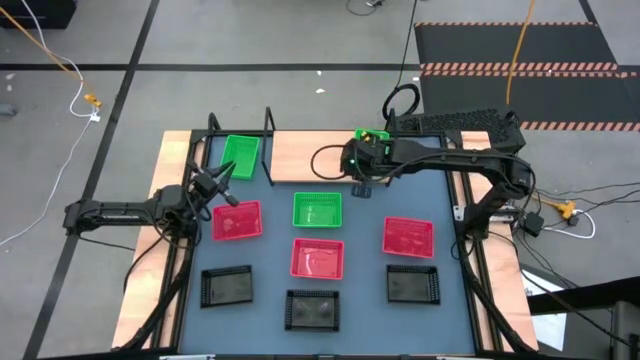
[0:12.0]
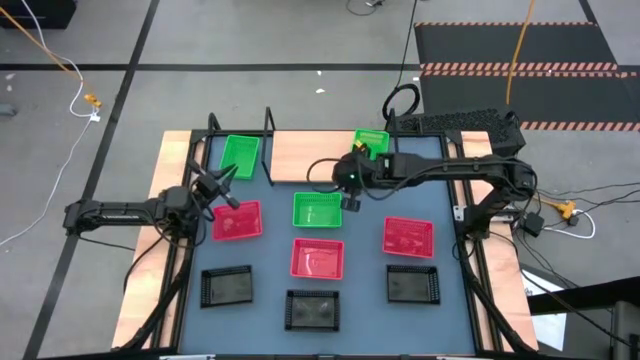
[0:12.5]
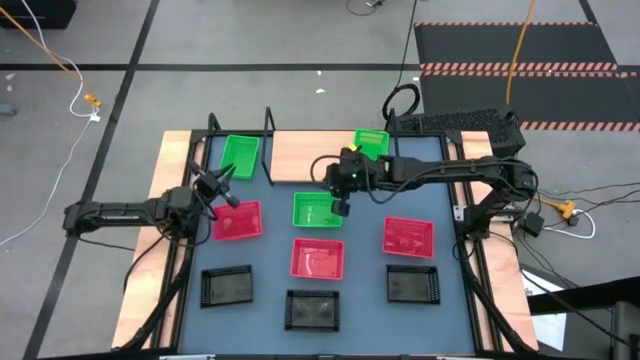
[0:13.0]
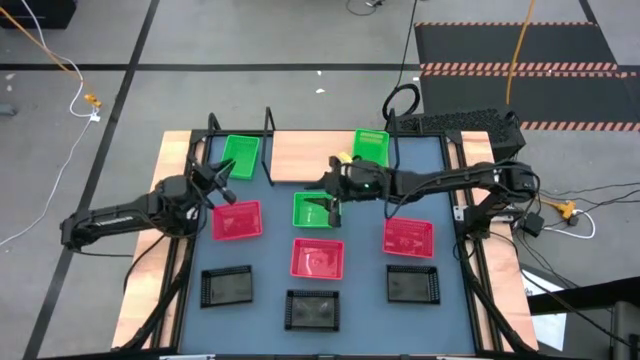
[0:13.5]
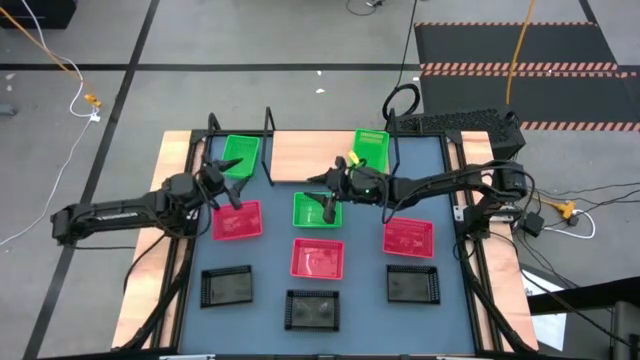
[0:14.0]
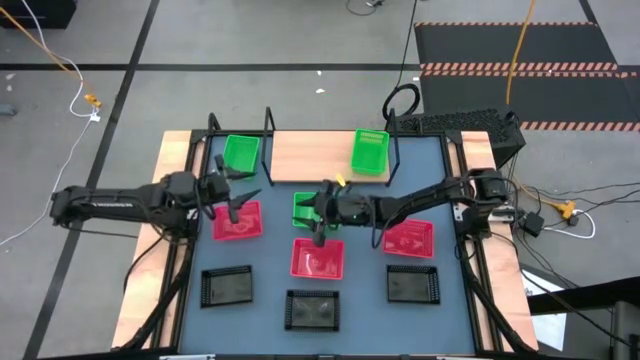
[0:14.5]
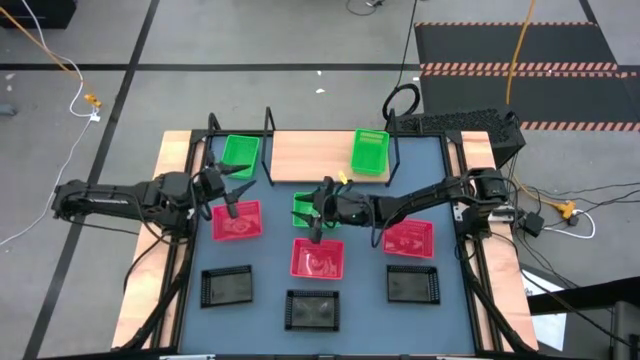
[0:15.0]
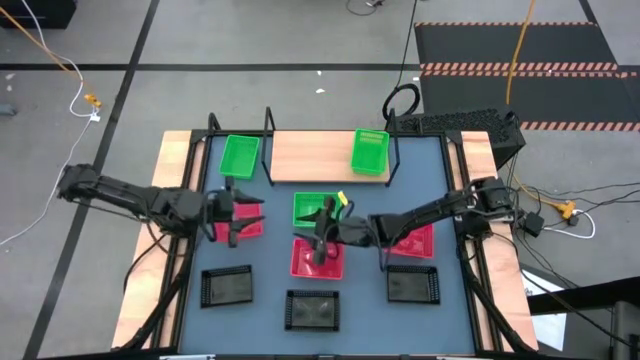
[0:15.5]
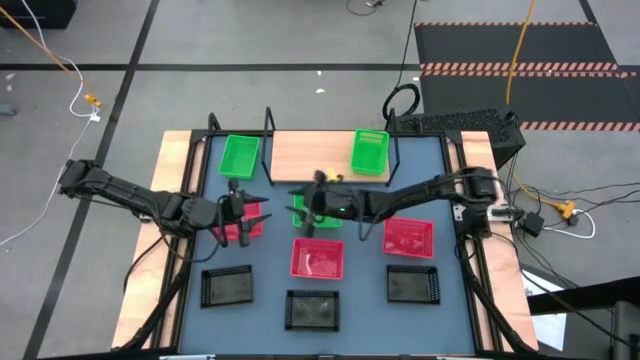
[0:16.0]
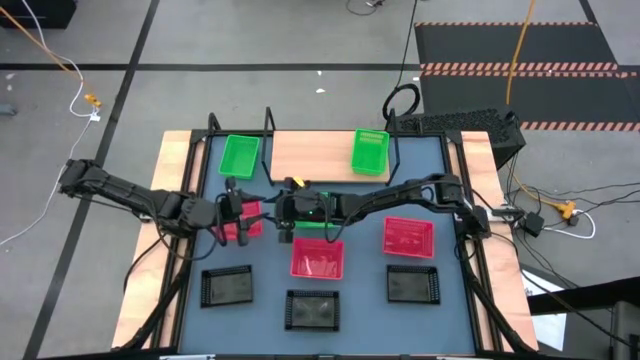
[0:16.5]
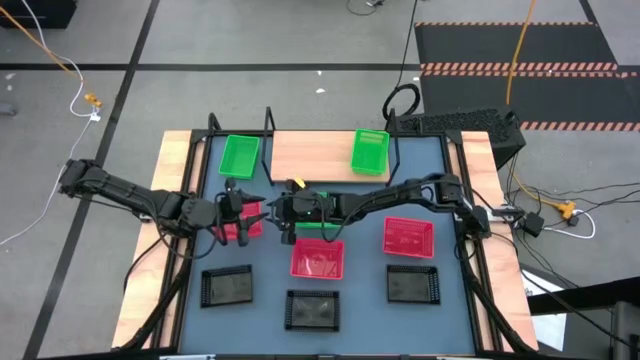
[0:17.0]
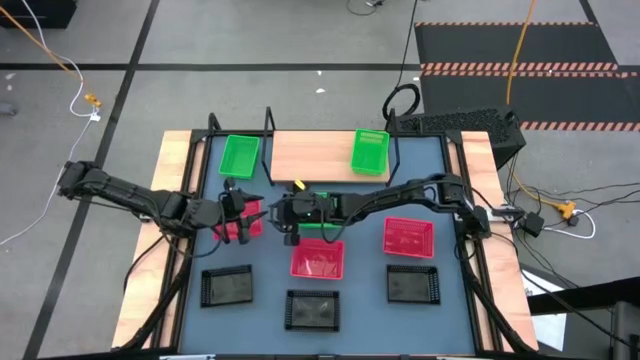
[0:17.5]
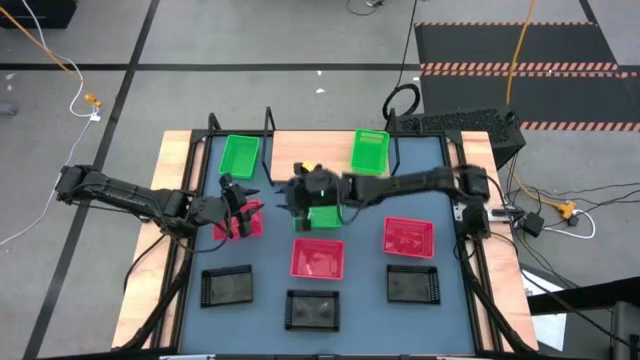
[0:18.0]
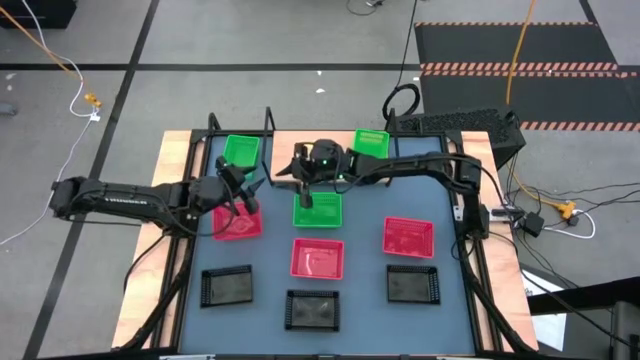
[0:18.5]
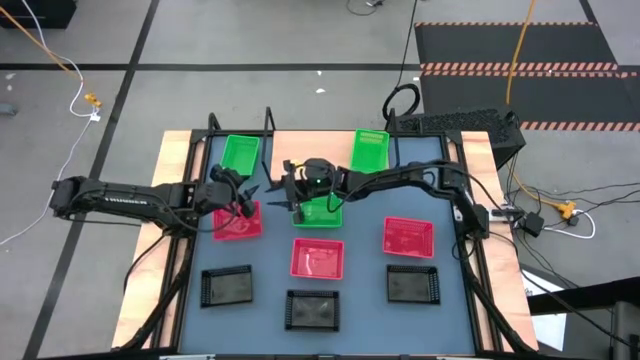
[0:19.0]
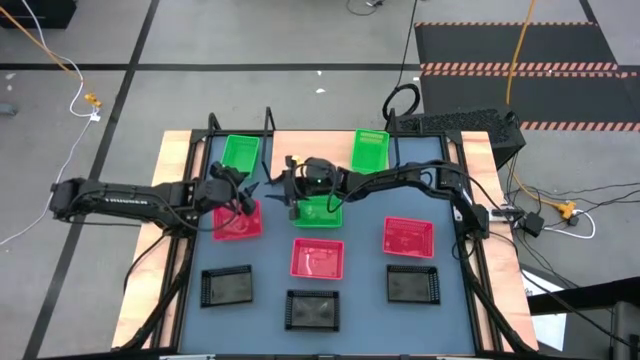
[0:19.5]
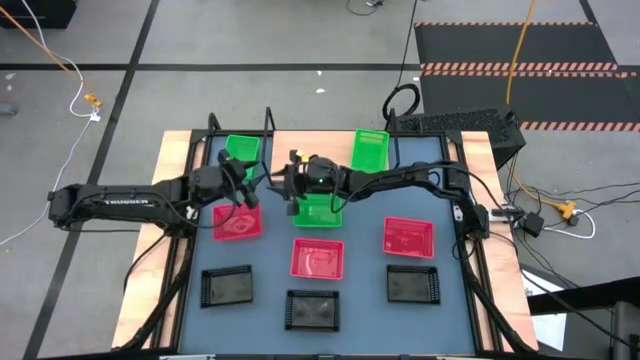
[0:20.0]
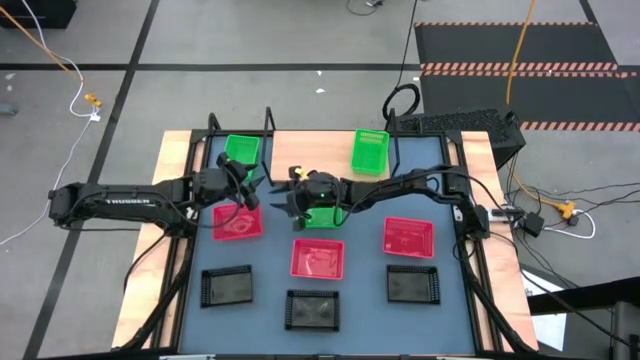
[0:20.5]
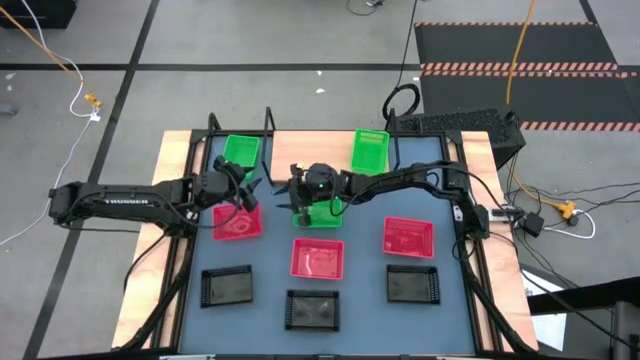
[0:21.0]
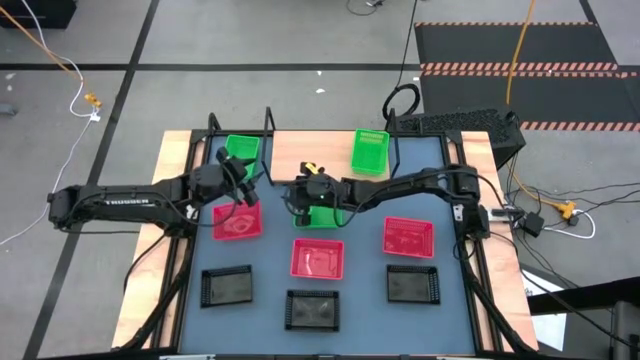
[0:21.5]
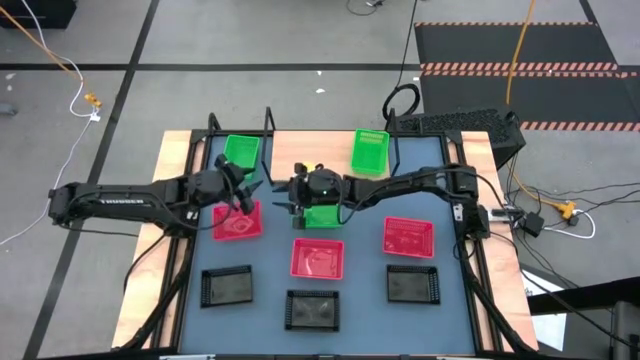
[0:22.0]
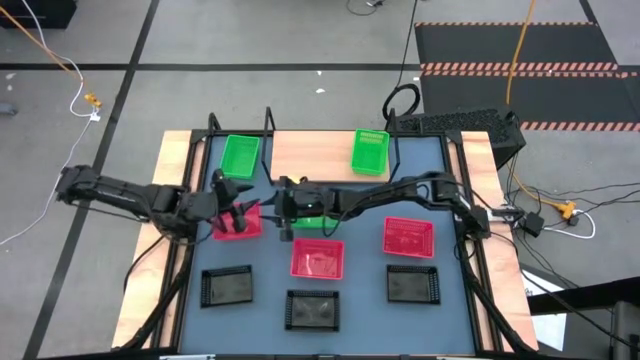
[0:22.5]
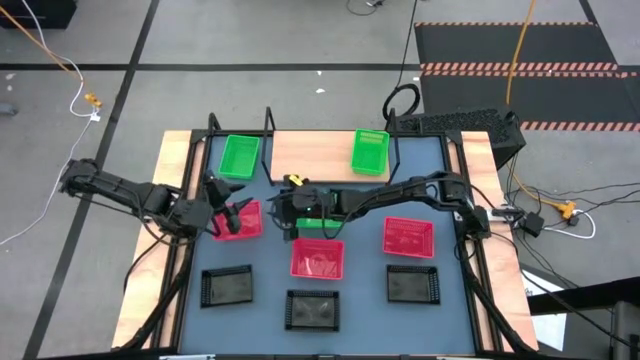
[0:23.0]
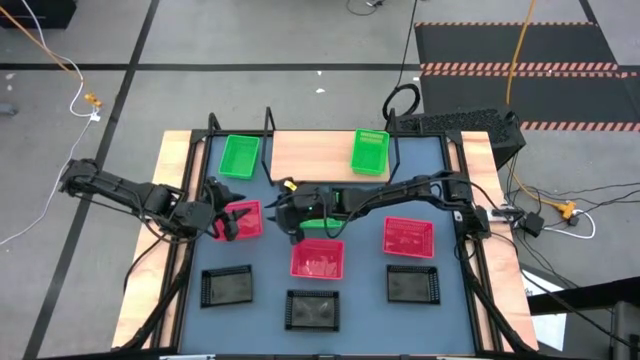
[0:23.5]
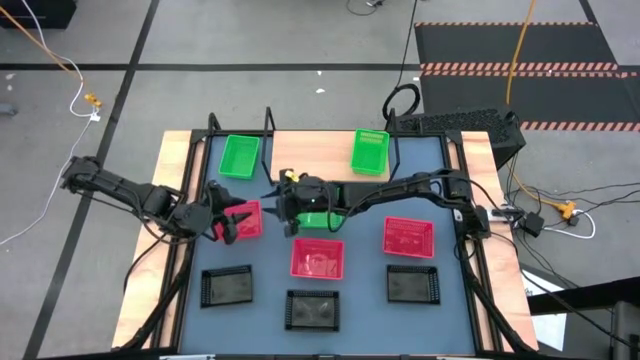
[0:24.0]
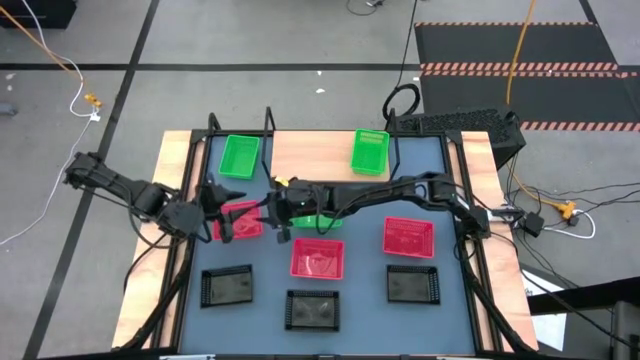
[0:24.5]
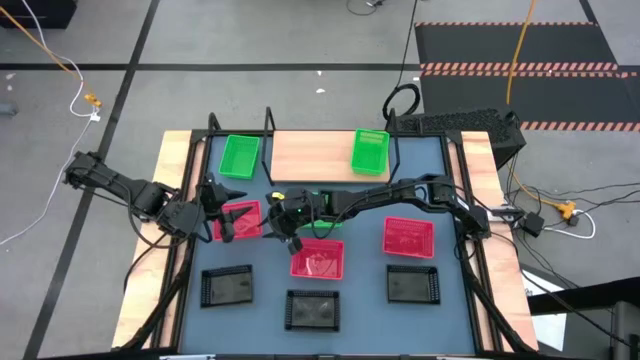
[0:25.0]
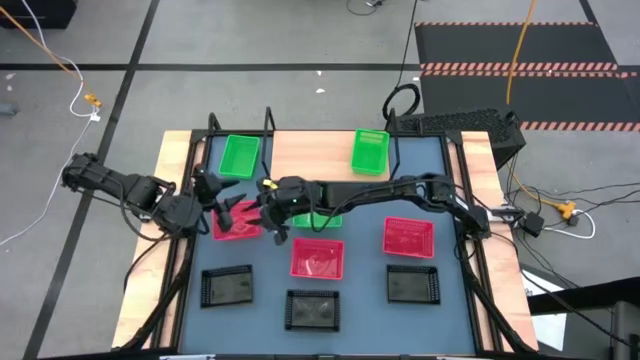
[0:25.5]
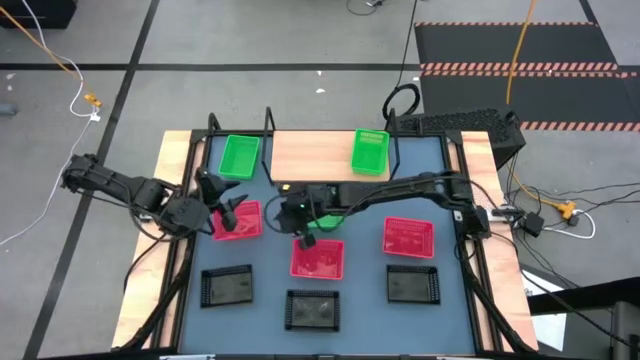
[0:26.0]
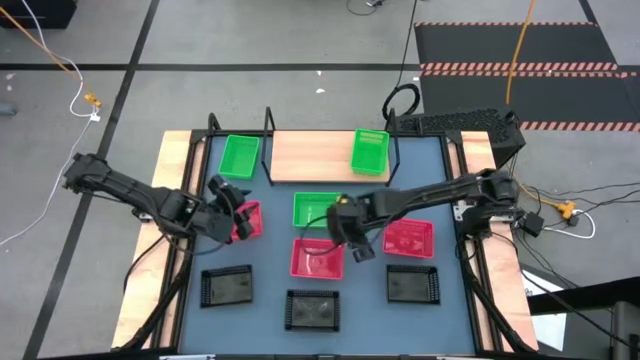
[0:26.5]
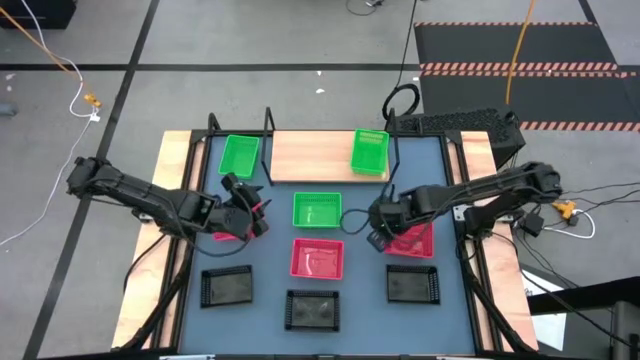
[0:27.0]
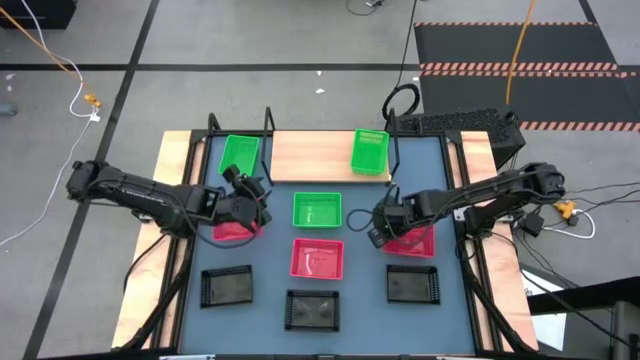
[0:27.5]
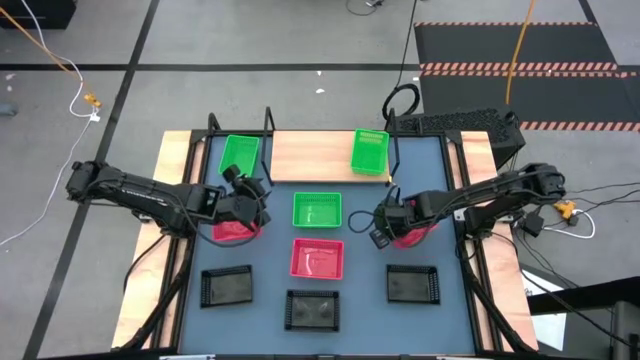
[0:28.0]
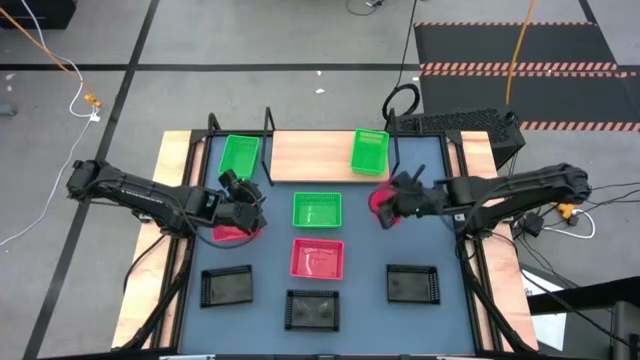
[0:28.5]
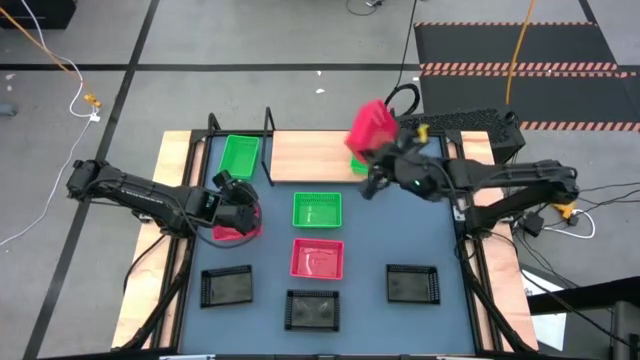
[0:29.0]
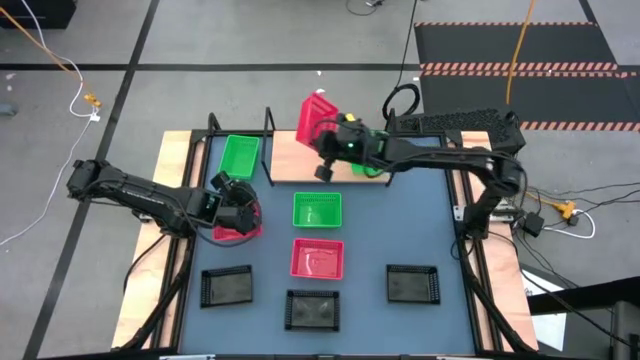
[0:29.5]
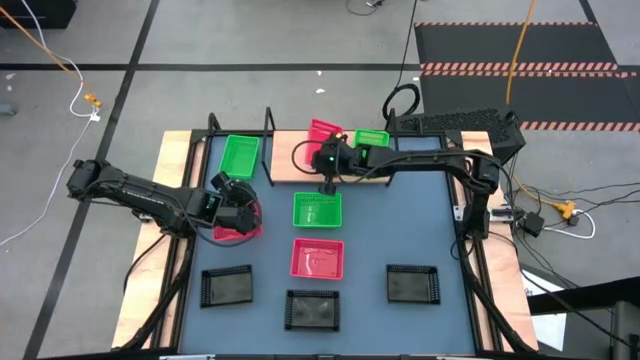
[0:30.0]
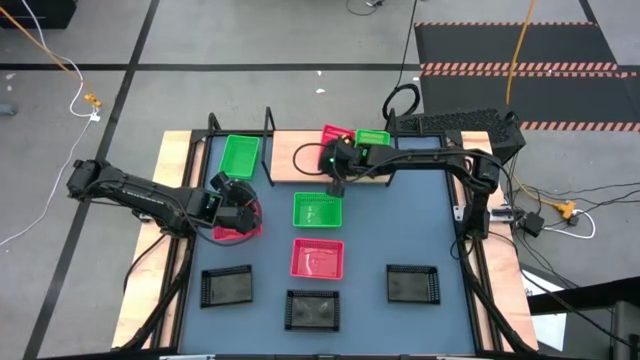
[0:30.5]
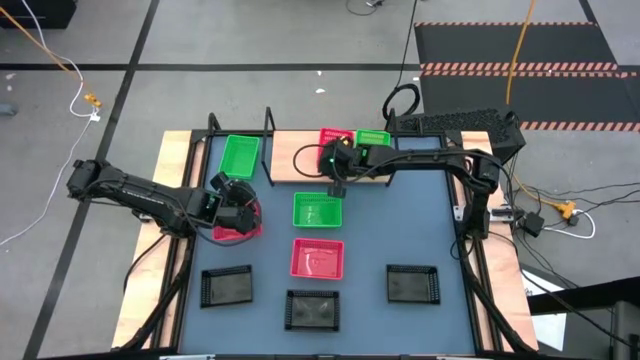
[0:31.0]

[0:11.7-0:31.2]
Task: Stack baskets on shelf by color
Put the right red bin on the shelf
